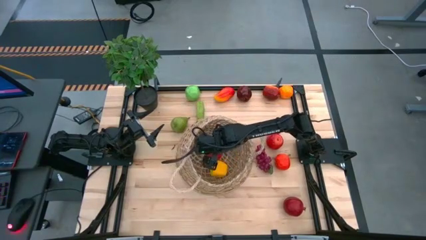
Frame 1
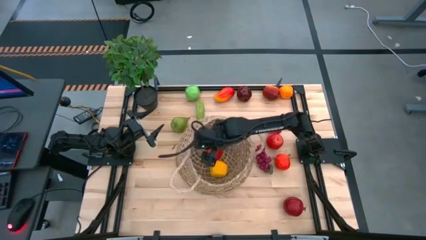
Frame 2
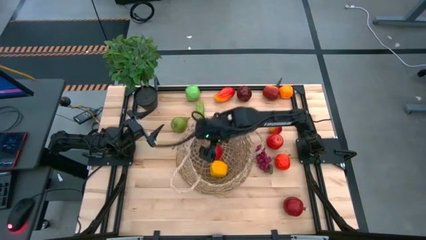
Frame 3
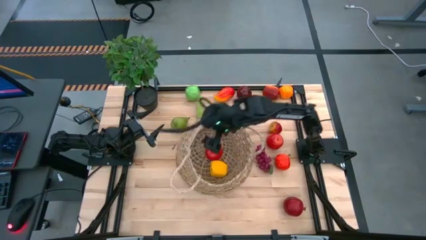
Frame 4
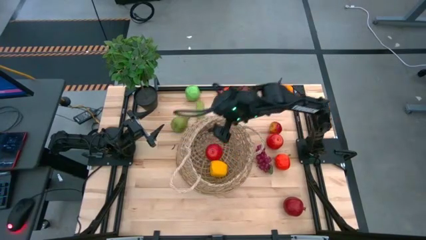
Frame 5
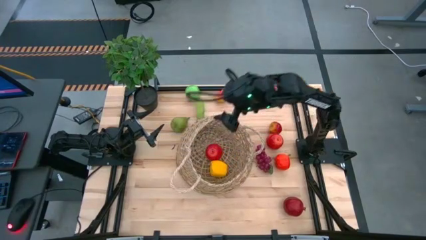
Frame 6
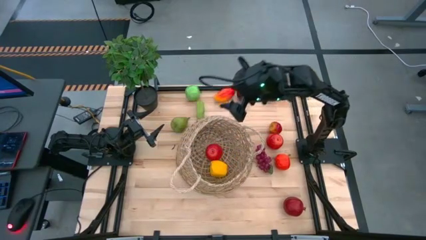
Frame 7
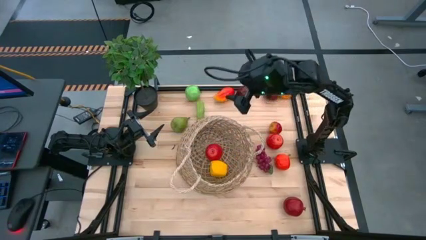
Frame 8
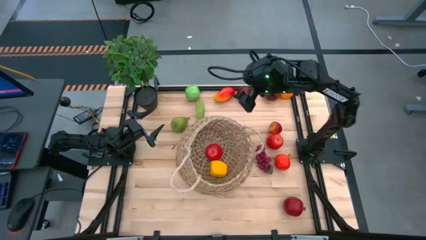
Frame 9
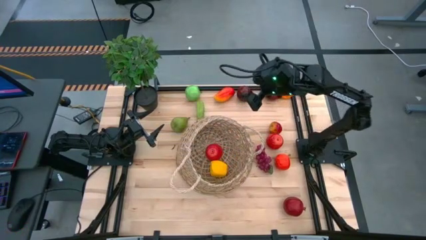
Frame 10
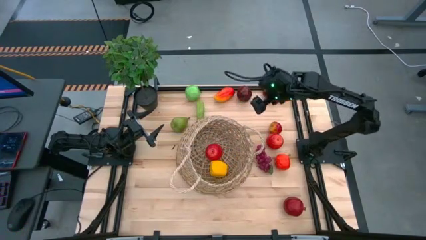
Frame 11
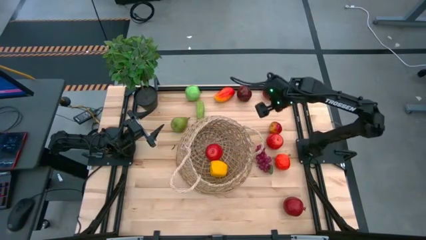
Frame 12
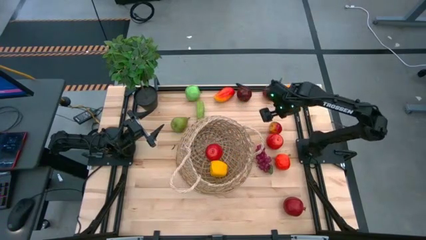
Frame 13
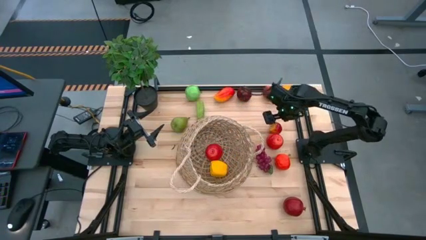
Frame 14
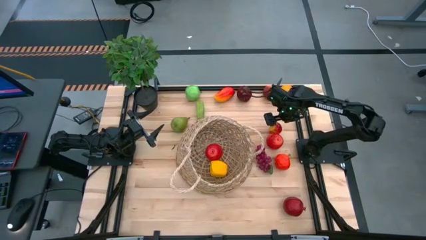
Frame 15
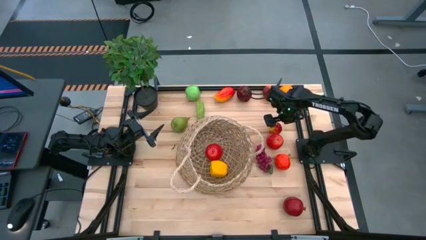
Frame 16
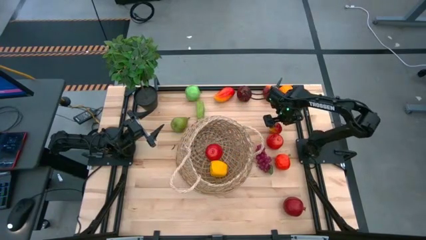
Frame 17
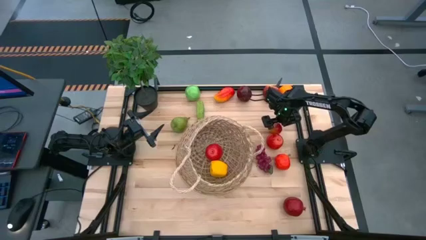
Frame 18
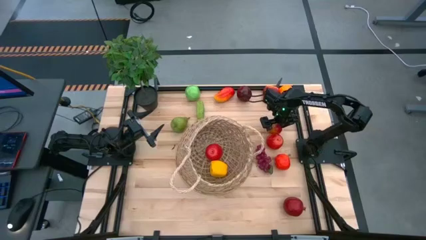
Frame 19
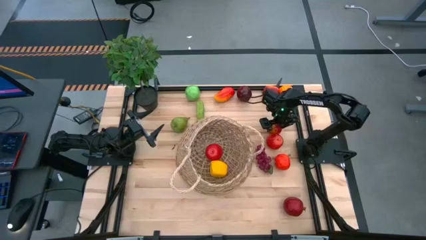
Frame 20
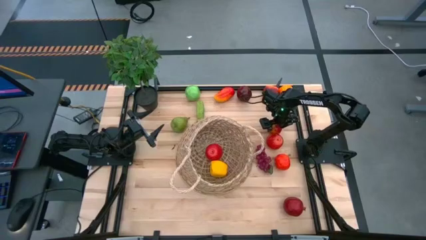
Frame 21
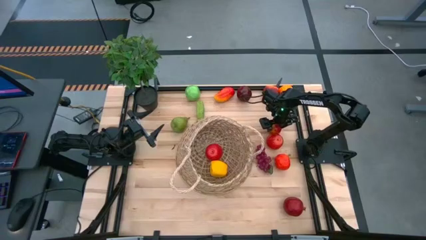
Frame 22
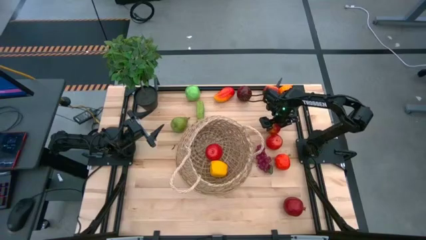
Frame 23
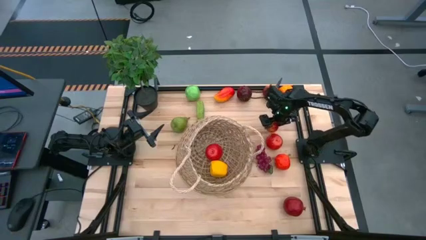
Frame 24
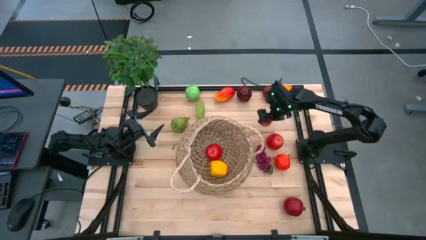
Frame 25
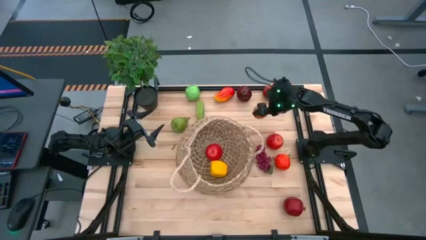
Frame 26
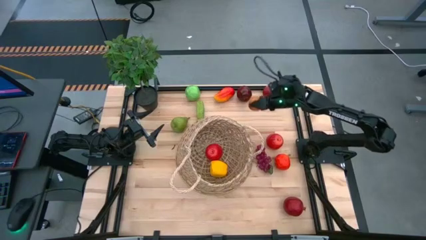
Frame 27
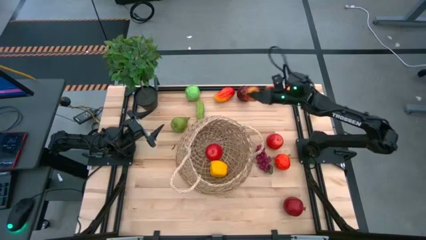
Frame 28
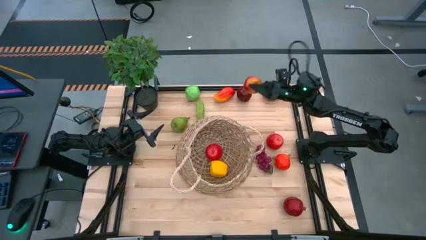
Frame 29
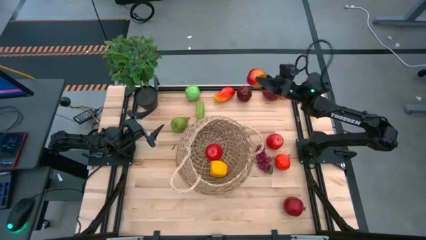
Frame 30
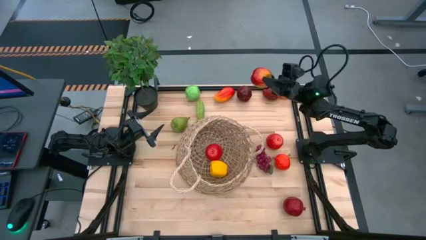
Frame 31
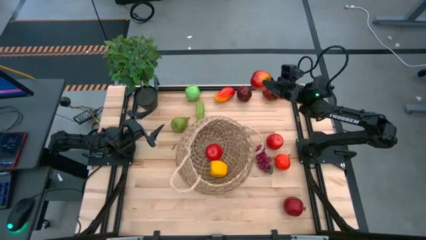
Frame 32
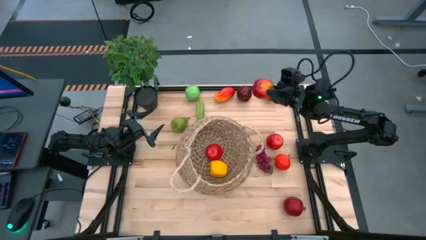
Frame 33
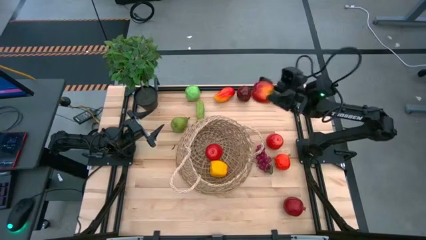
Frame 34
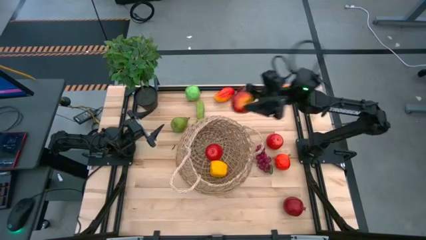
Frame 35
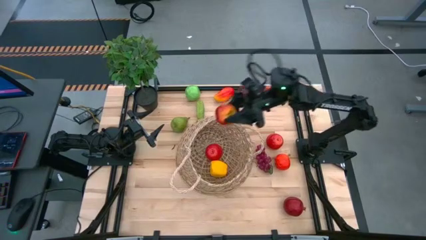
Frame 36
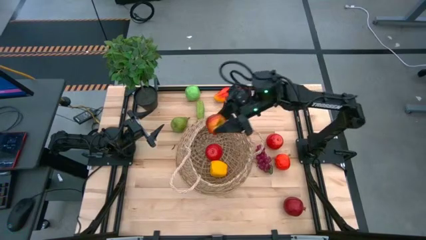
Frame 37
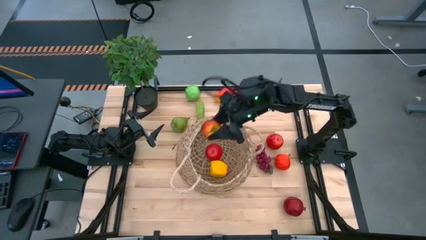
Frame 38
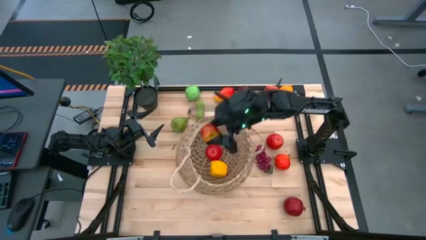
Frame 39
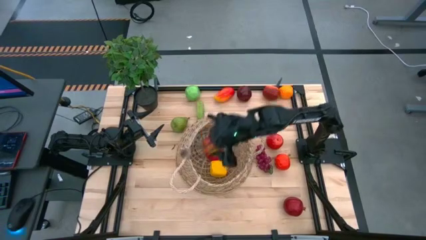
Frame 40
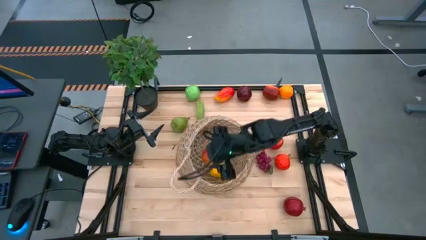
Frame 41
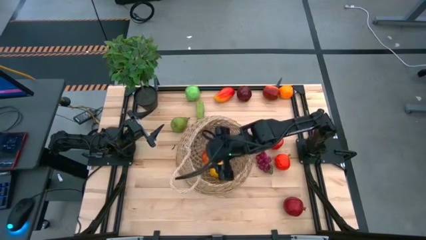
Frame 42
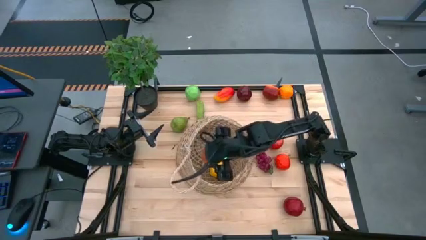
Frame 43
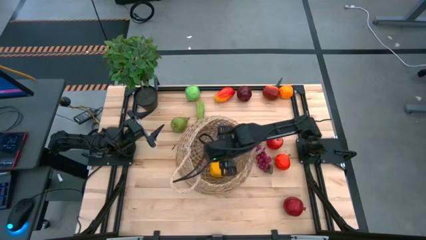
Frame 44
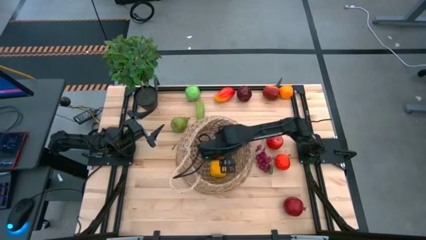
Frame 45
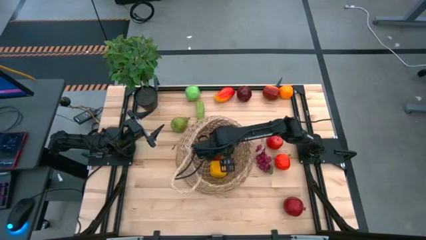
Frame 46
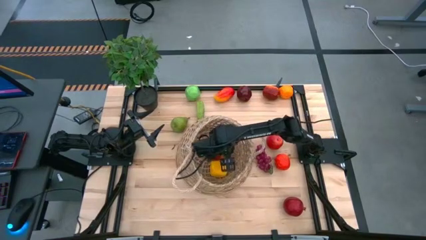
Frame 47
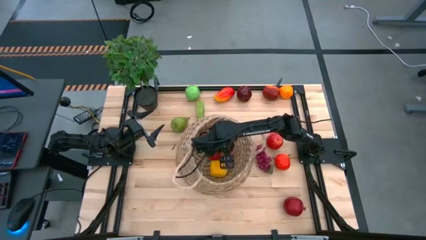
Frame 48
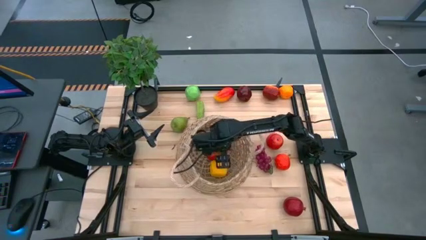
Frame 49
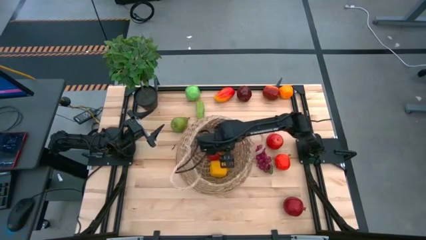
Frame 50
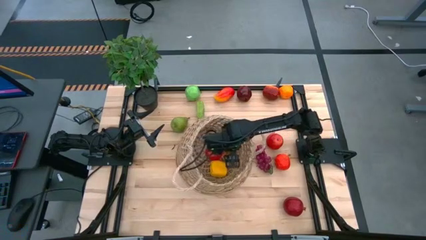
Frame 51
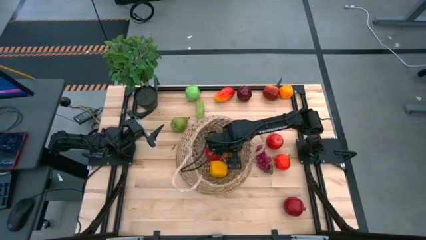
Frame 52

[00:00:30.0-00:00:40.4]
Task: Build produce basket
Put the red apple into the woven basket

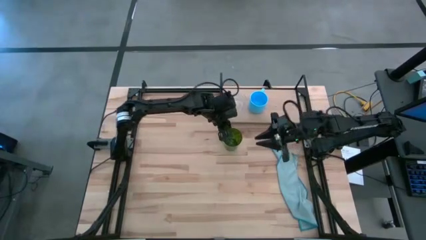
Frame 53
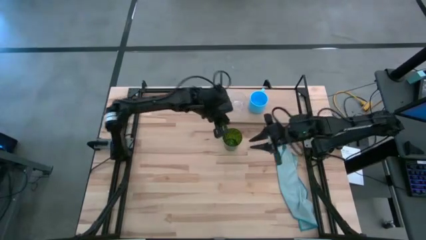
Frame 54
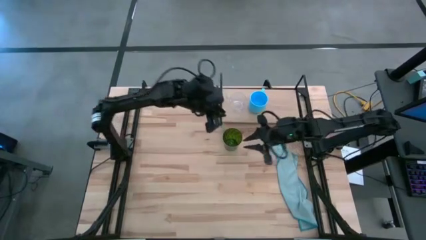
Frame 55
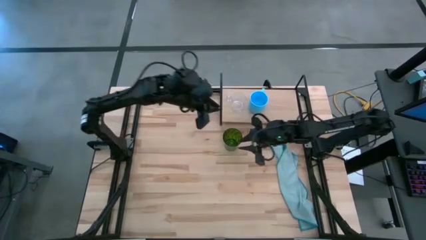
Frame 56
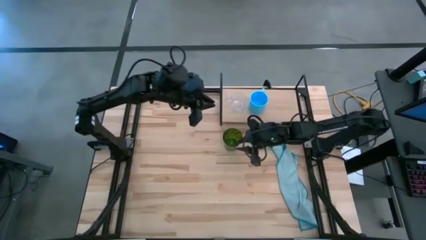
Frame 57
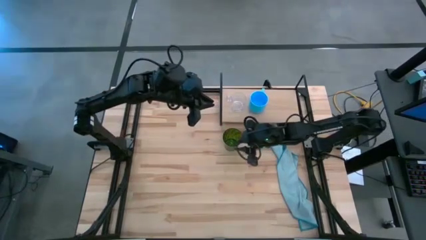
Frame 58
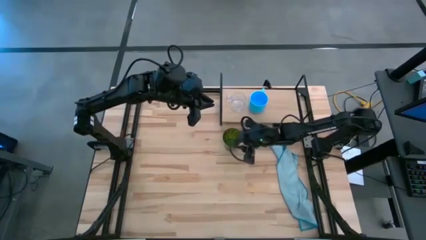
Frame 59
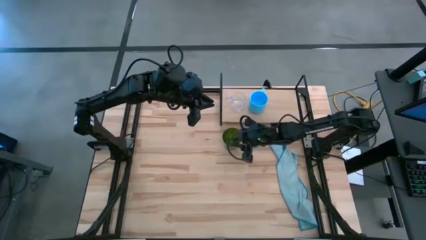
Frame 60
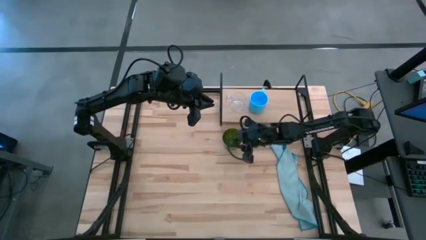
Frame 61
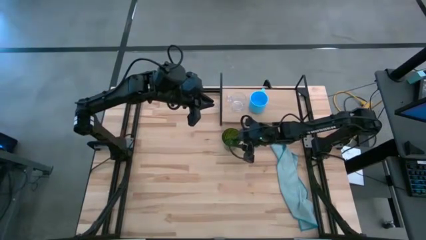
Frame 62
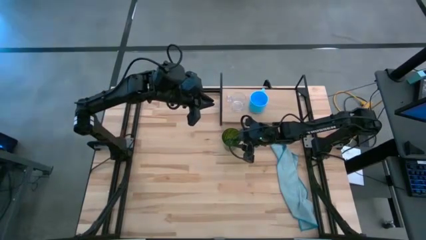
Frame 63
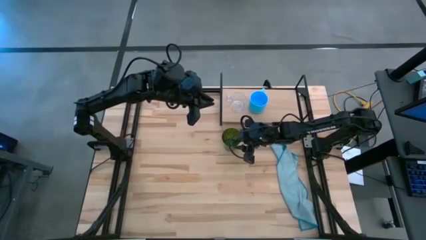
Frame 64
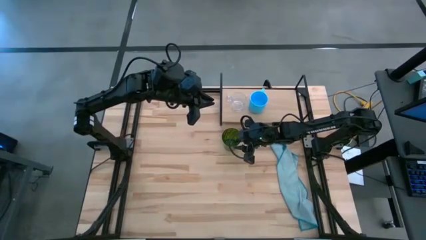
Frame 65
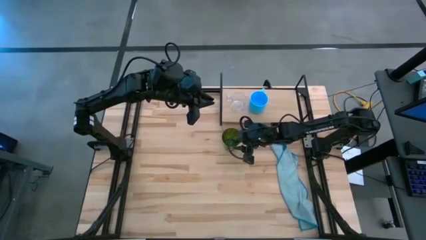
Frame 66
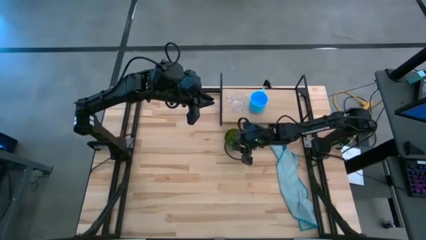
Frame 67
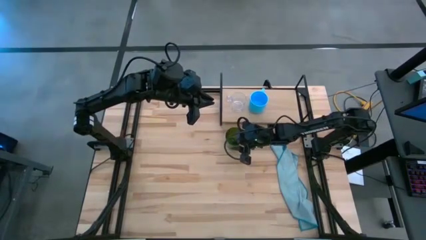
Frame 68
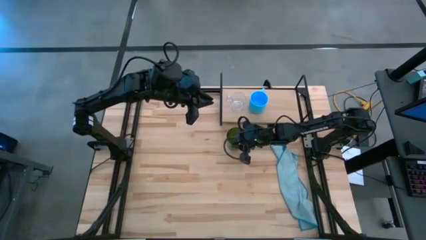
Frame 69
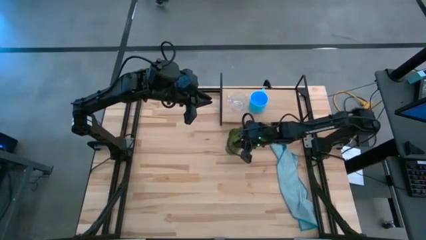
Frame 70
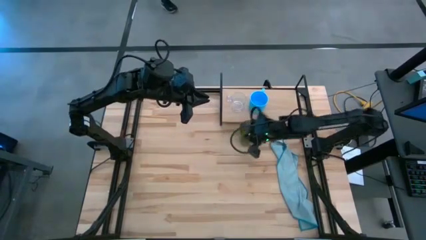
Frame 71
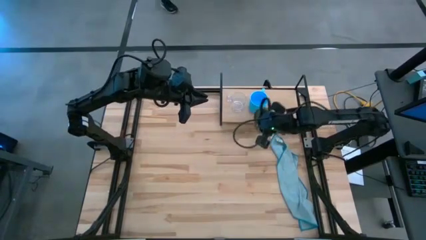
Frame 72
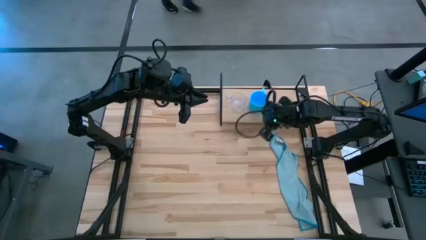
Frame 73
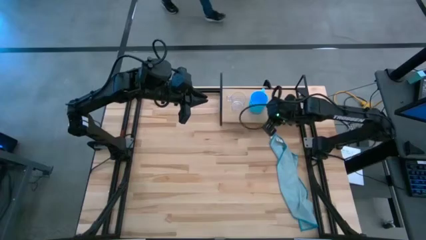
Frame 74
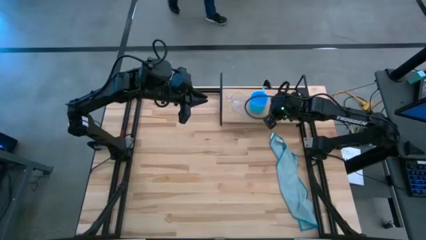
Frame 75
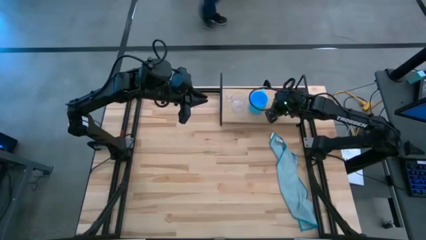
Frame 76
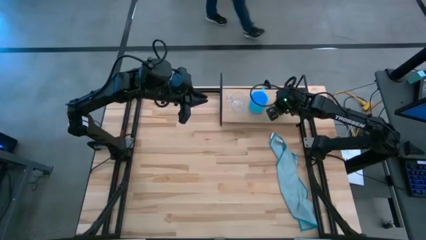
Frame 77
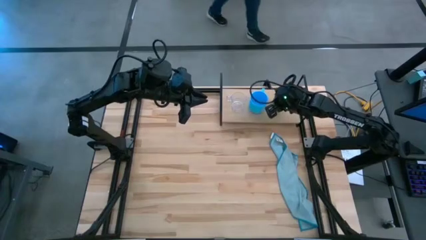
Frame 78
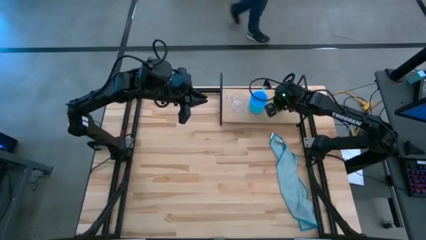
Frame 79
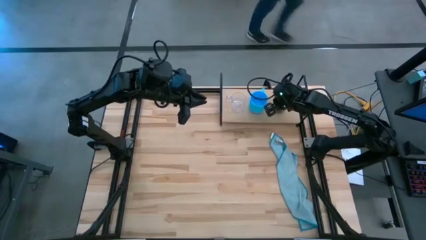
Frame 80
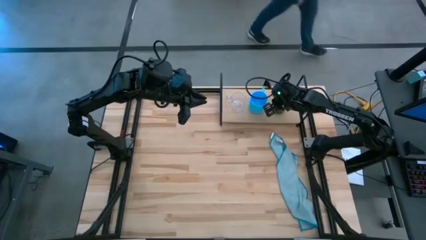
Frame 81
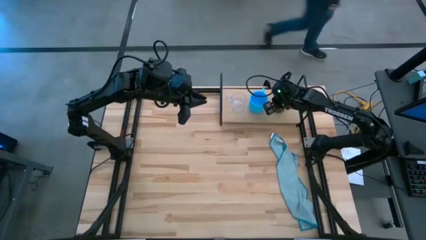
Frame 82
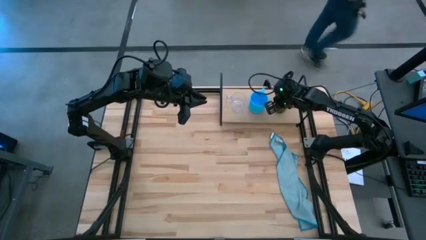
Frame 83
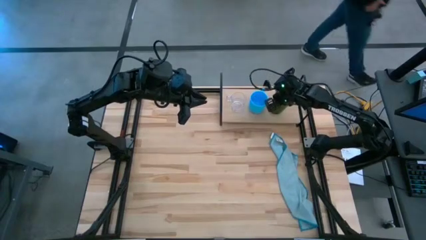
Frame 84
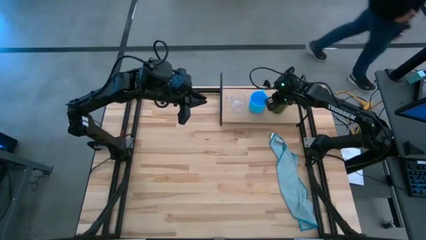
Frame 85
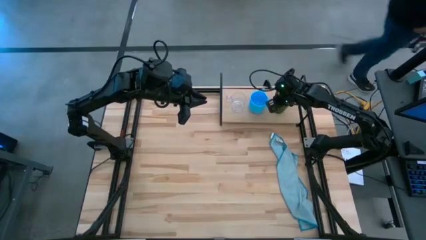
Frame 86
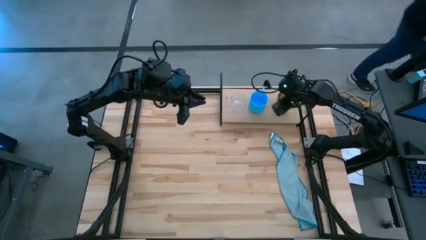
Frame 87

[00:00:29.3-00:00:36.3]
Task: Stack small to large cups/mugs on shelf
Put the green cup on the table
